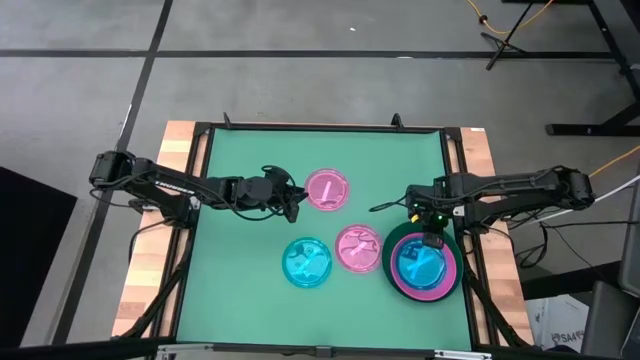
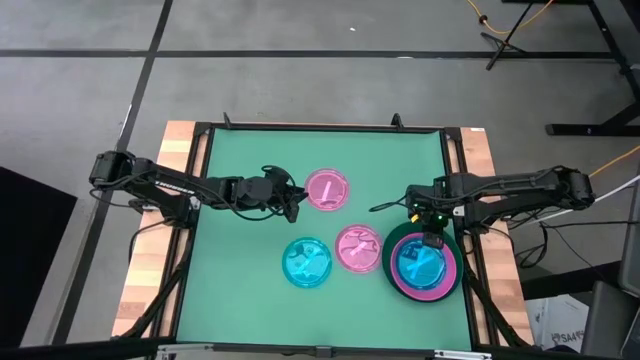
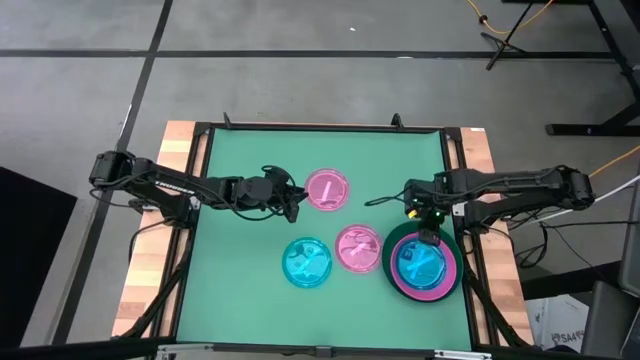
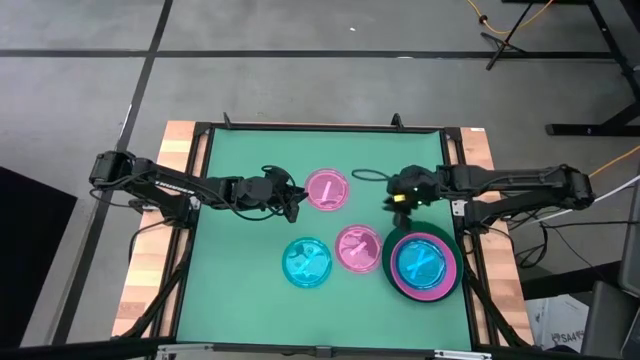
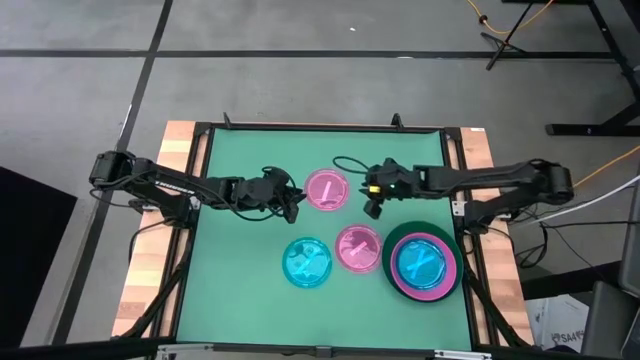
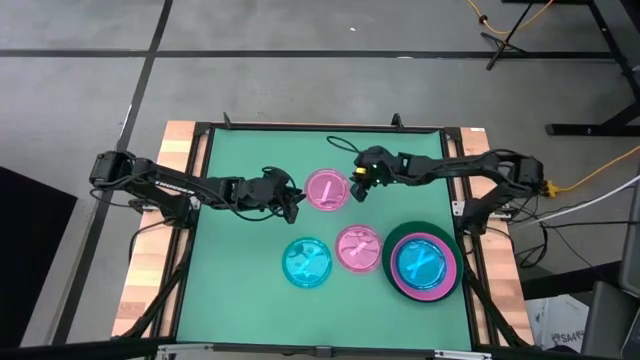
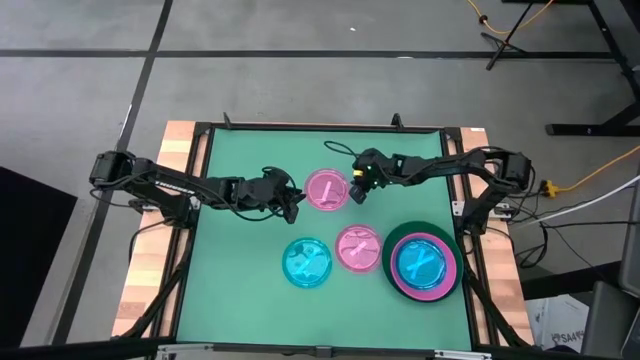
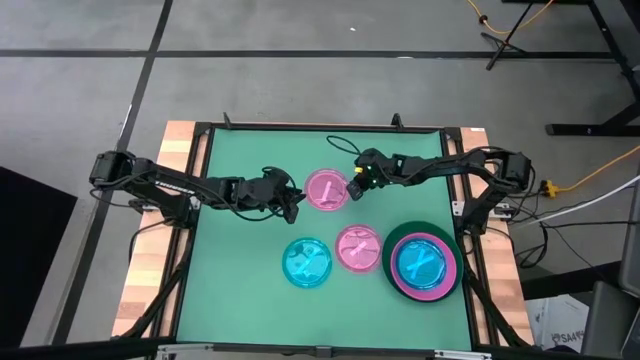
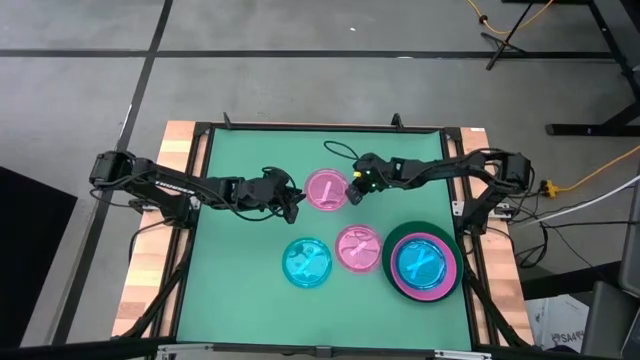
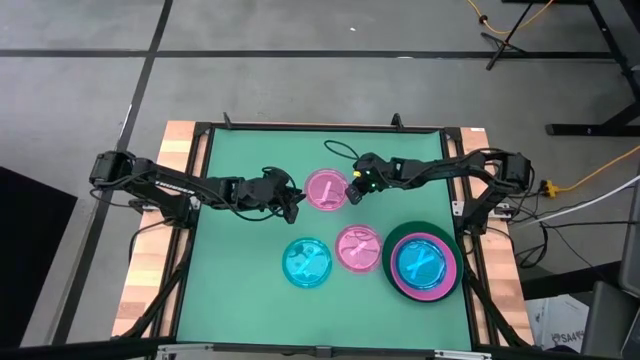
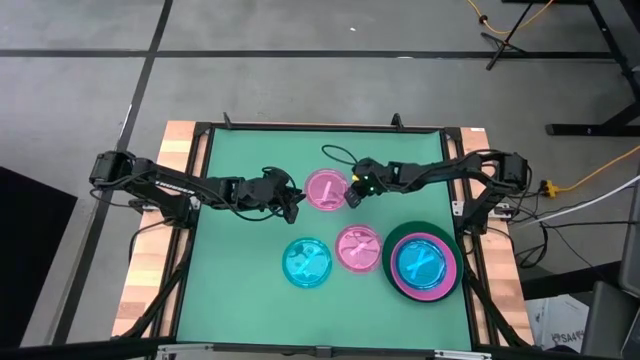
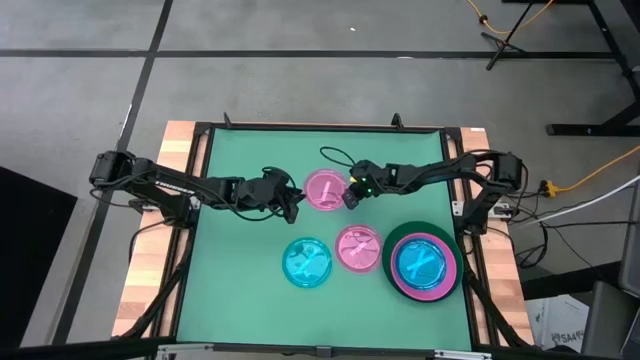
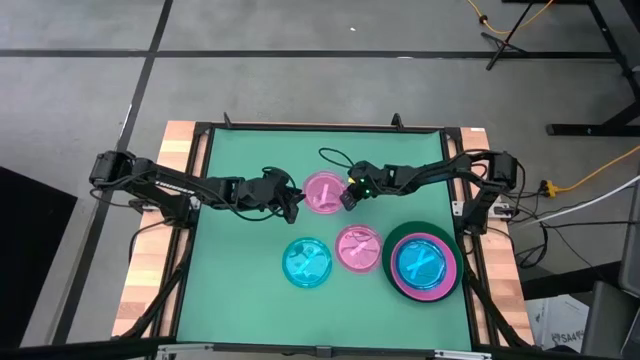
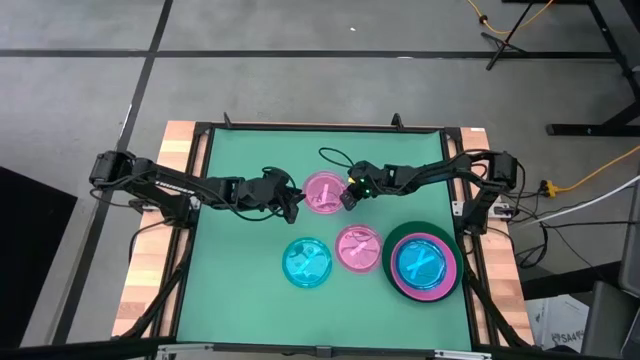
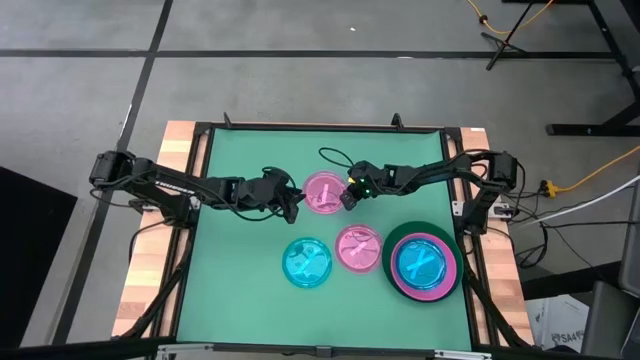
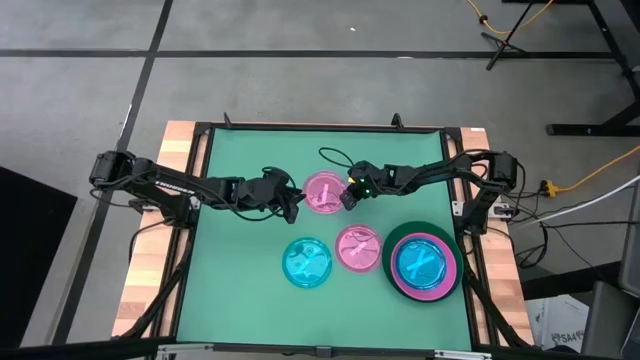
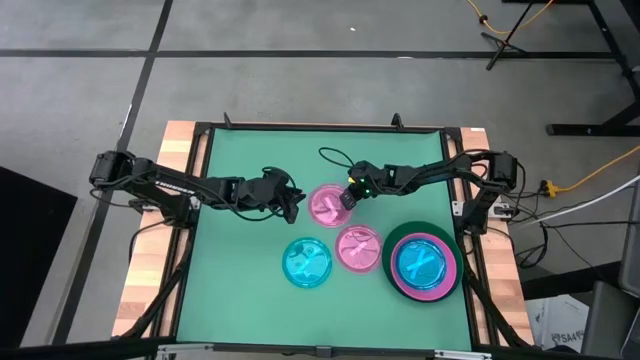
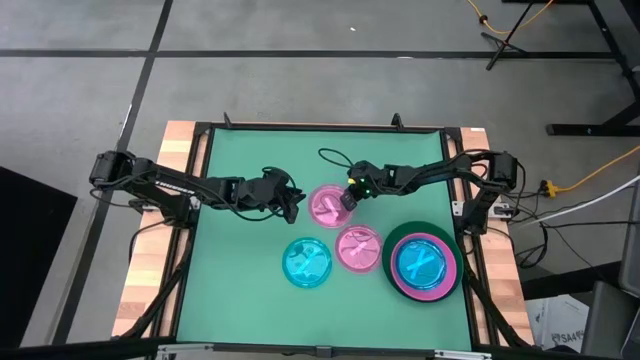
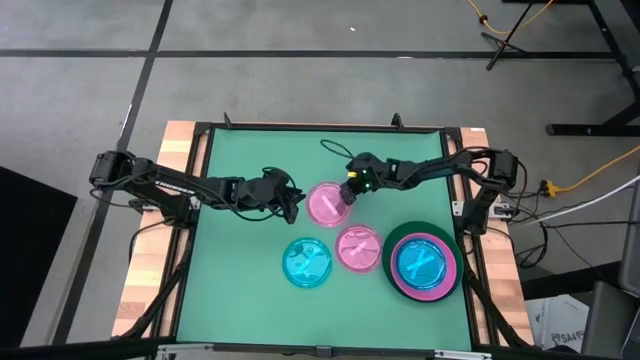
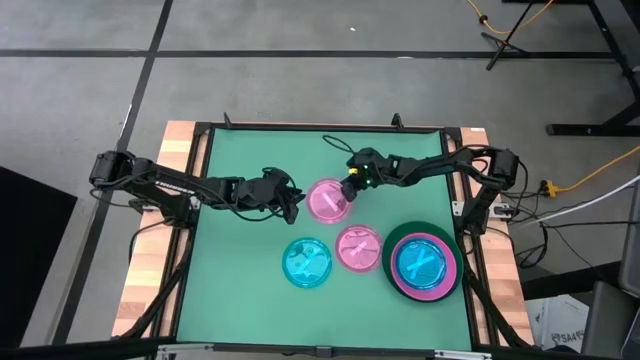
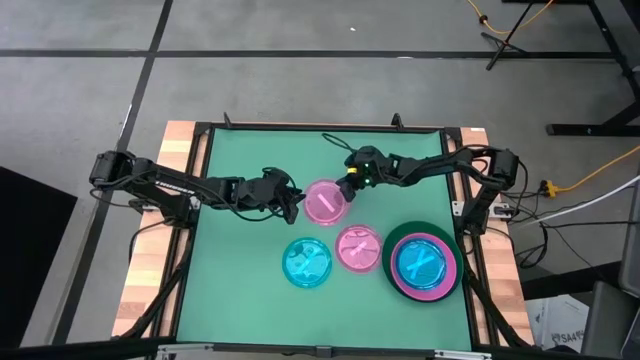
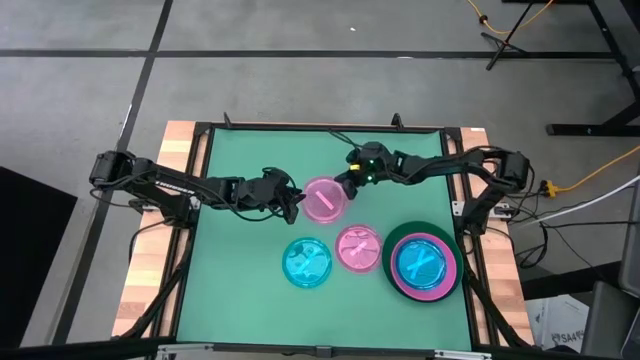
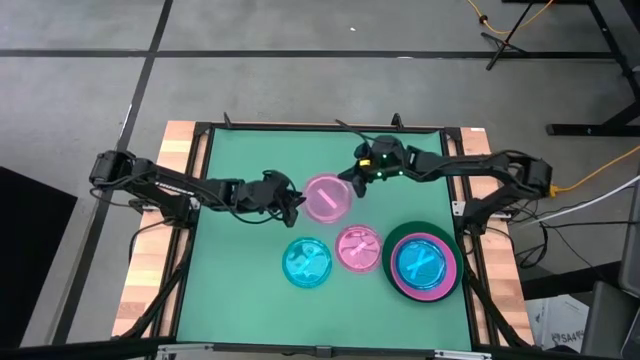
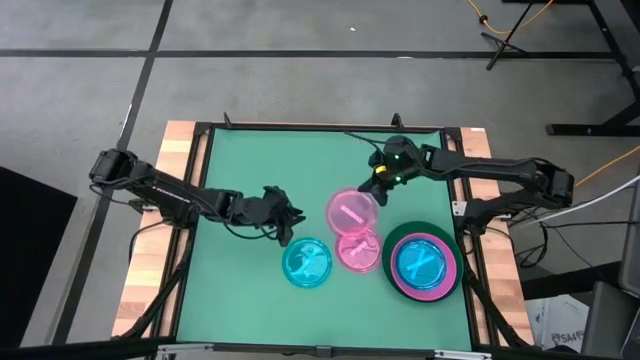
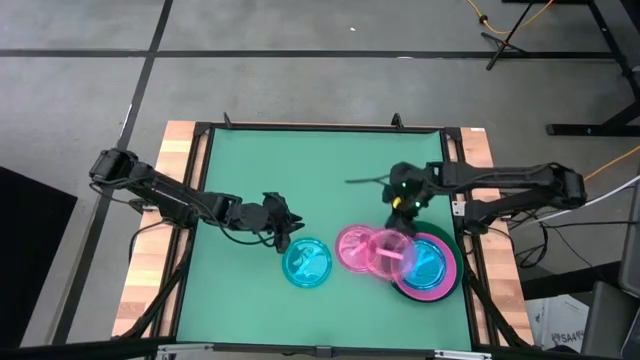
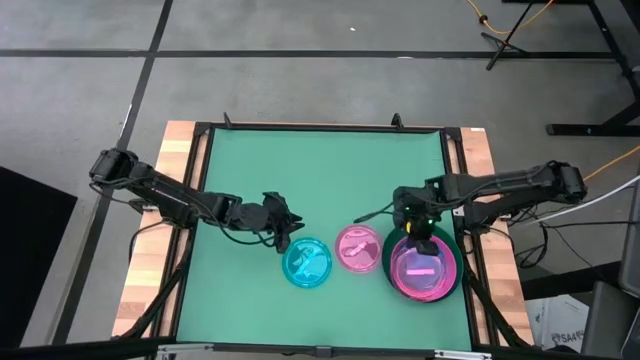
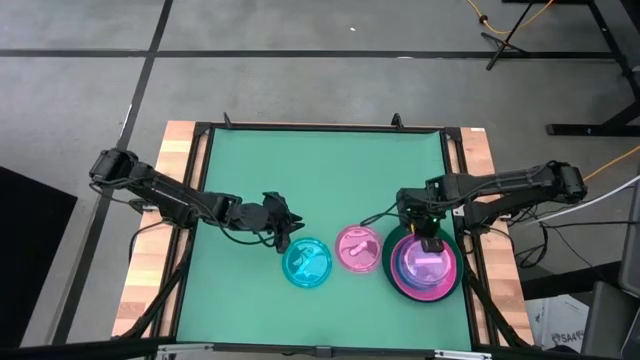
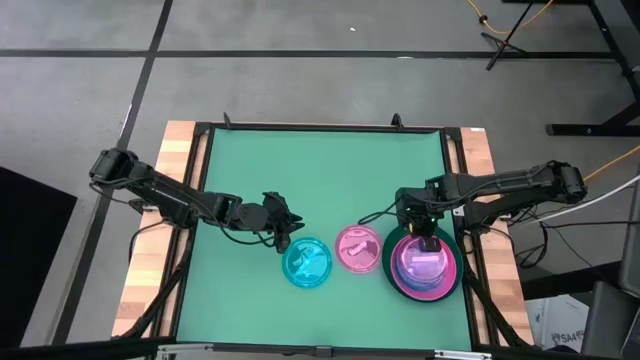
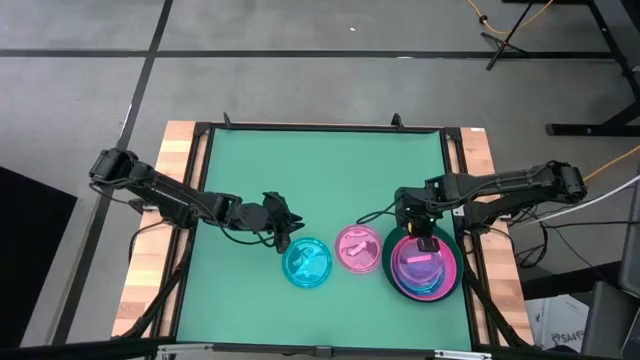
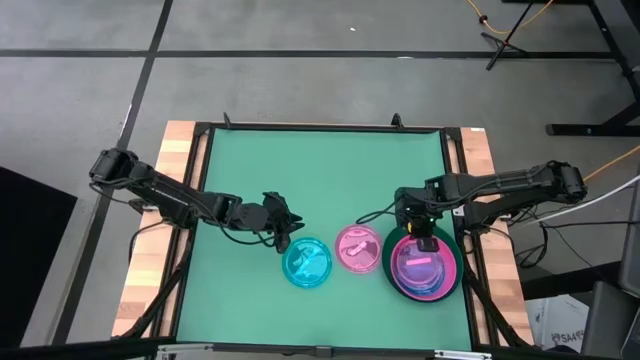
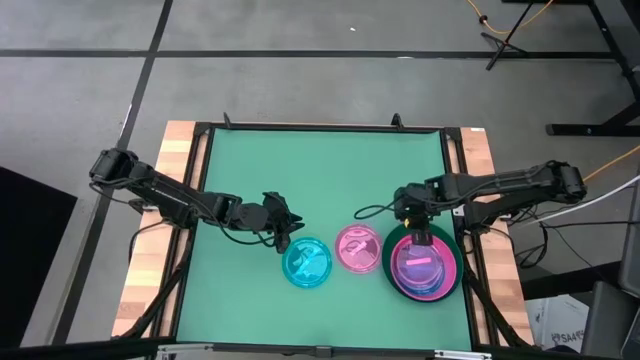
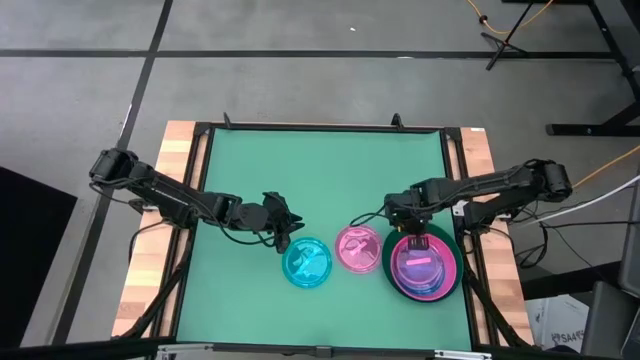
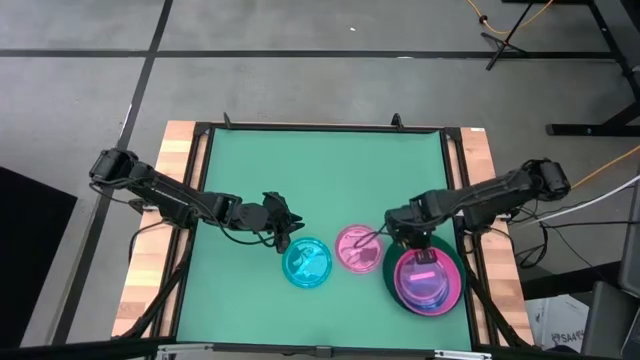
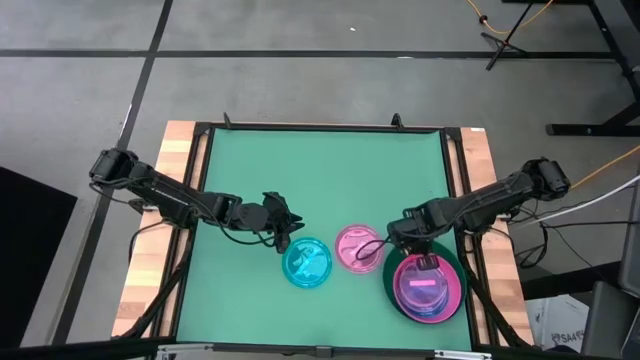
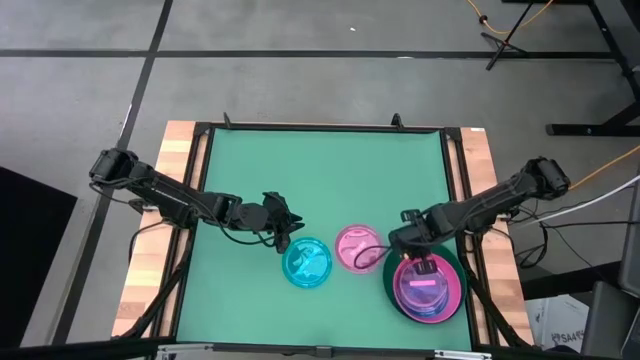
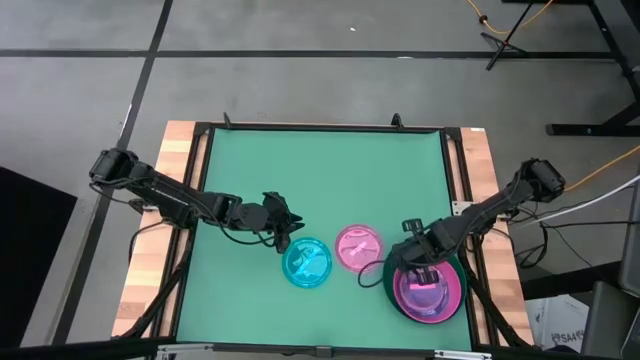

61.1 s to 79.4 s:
Task: Stack plastic plates
Stack the top transparent pink plate on top of the transparent blue plate

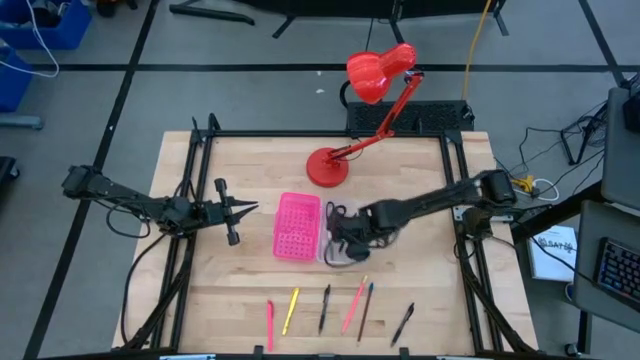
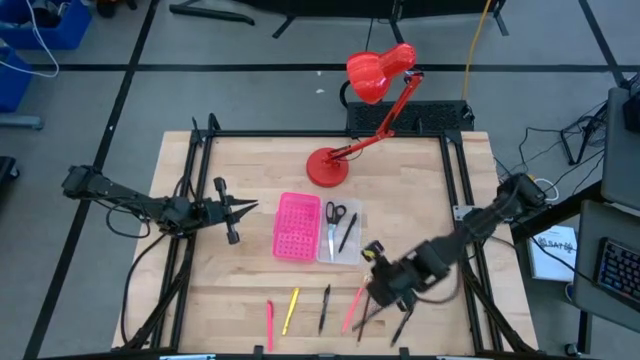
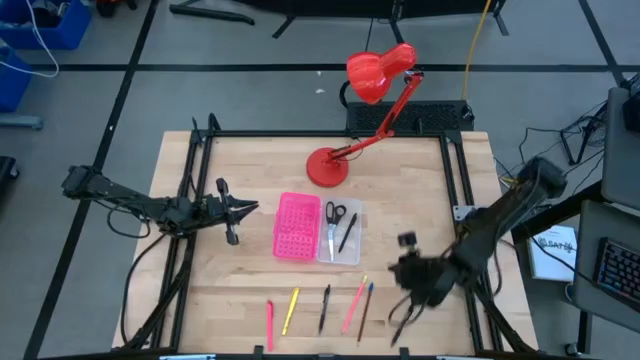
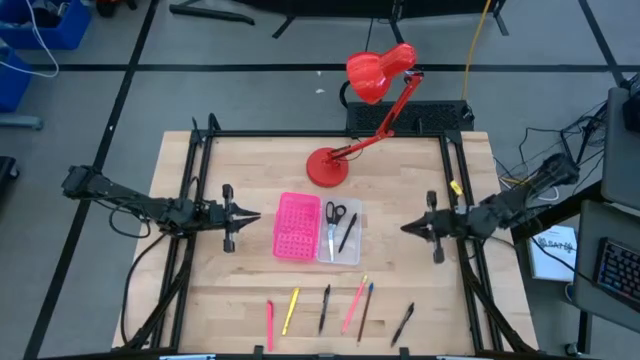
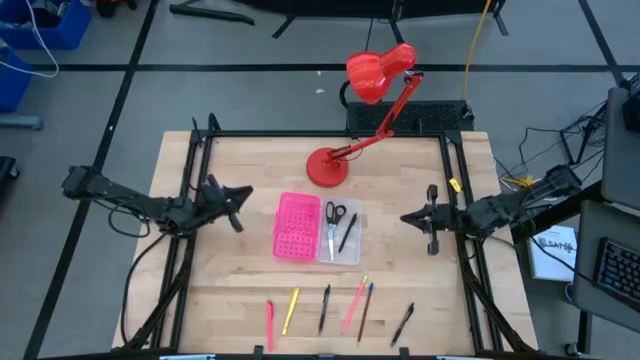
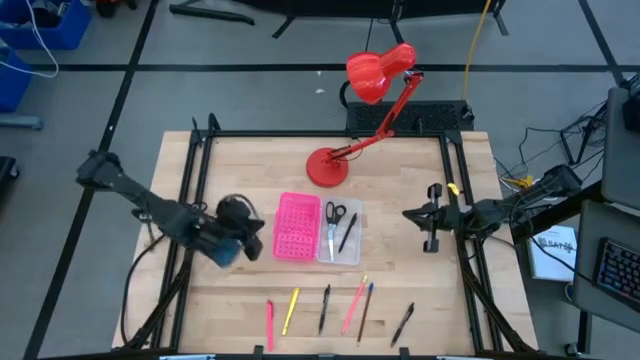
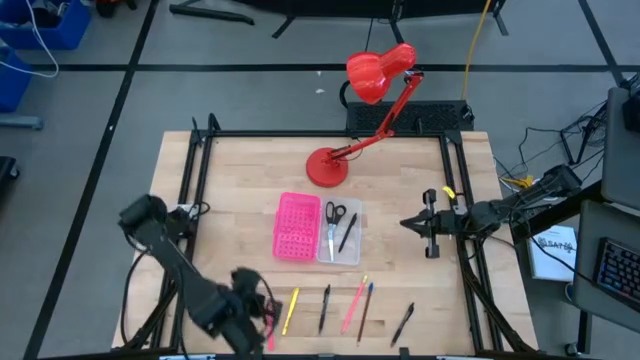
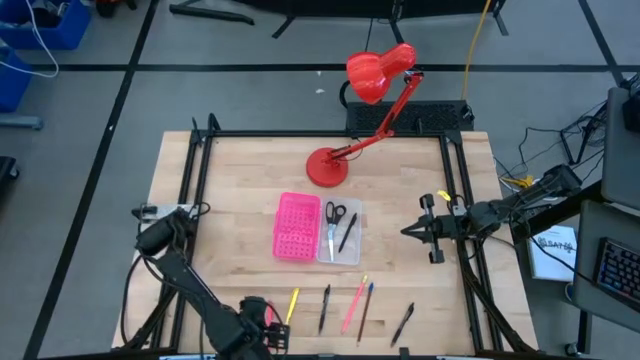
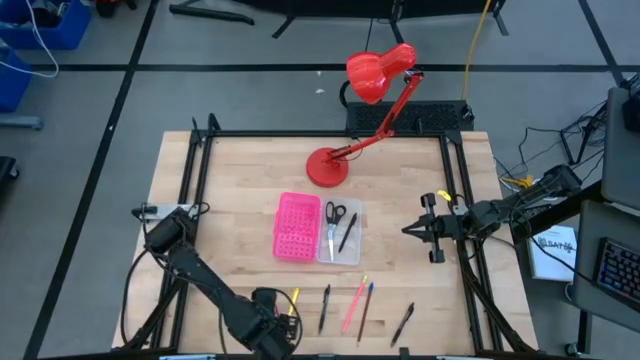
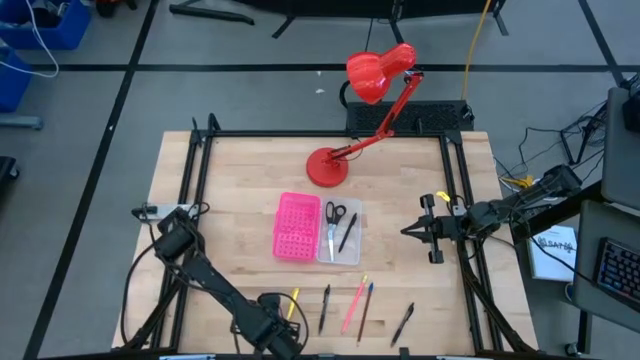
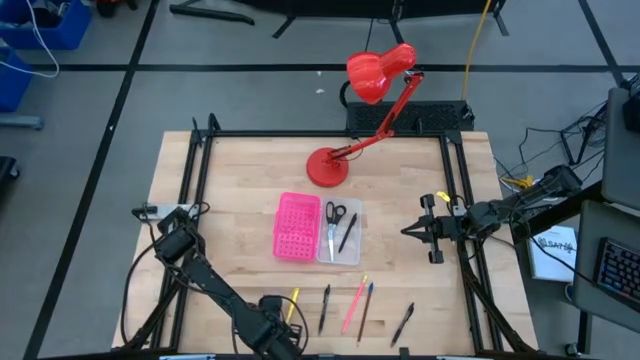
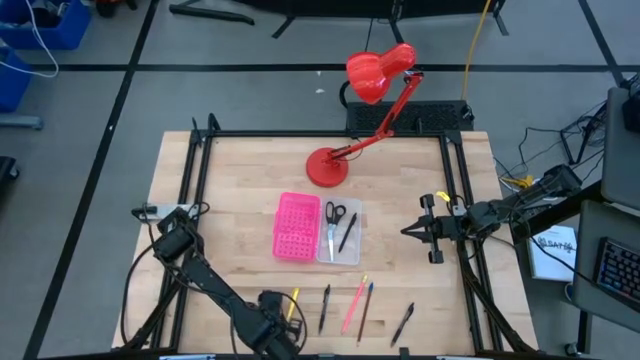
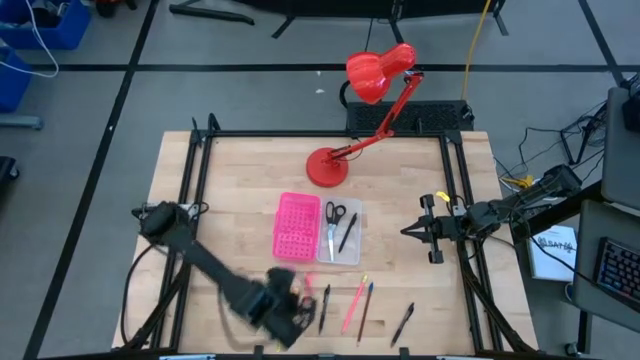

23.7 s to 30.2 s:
Task: Pick & place school supplies into a supply box
Put the pink pen into the pink supply box
